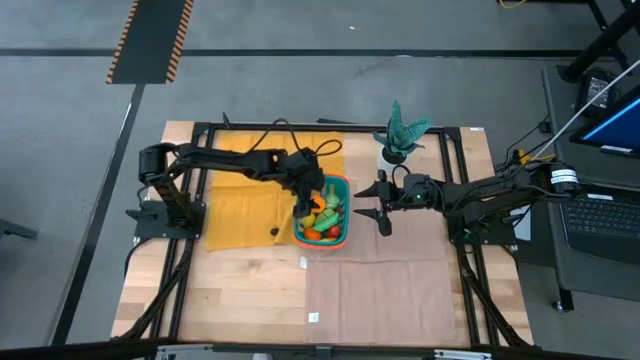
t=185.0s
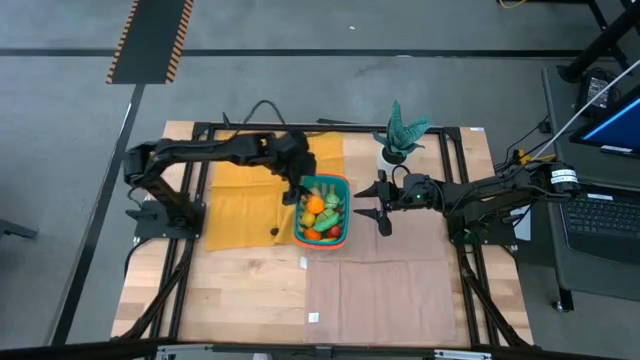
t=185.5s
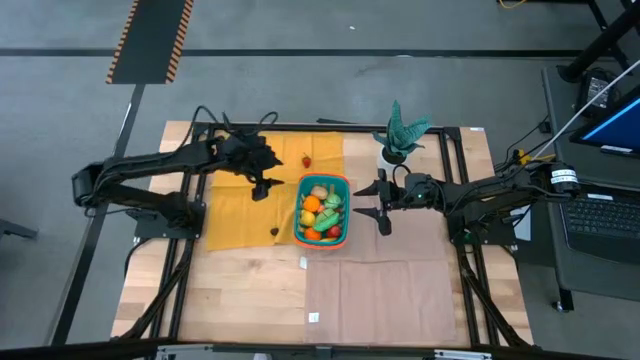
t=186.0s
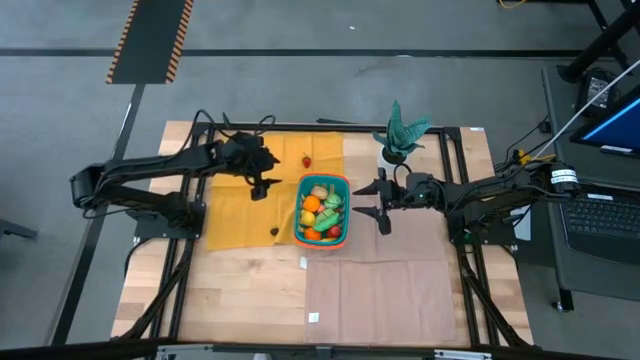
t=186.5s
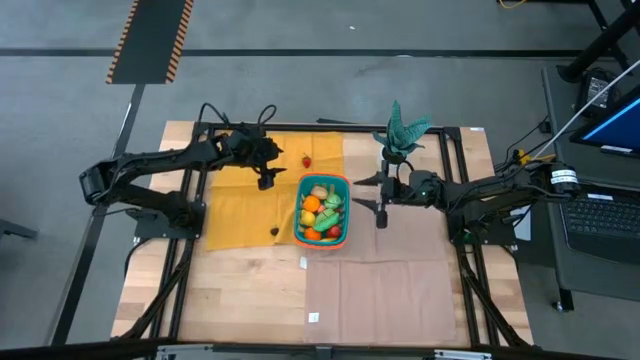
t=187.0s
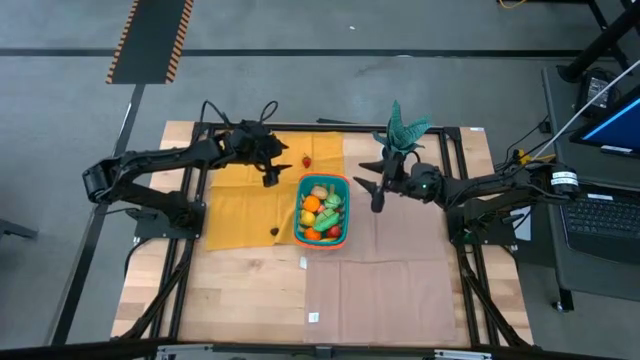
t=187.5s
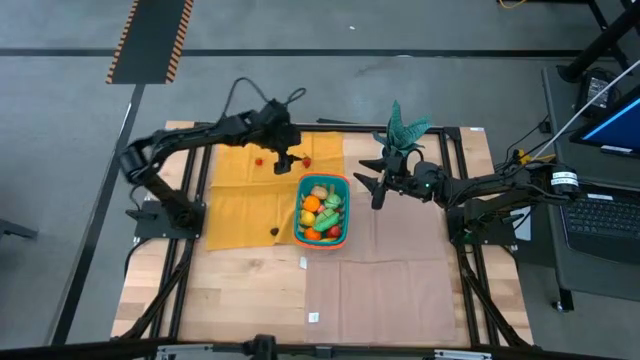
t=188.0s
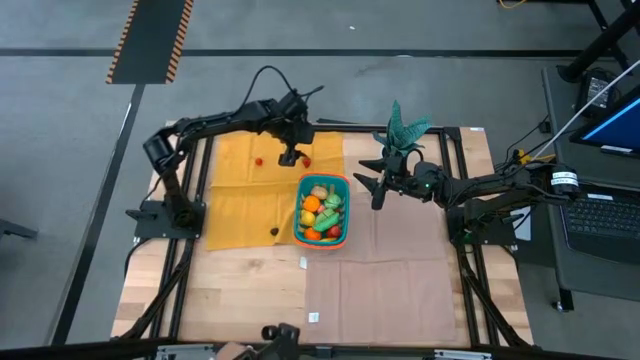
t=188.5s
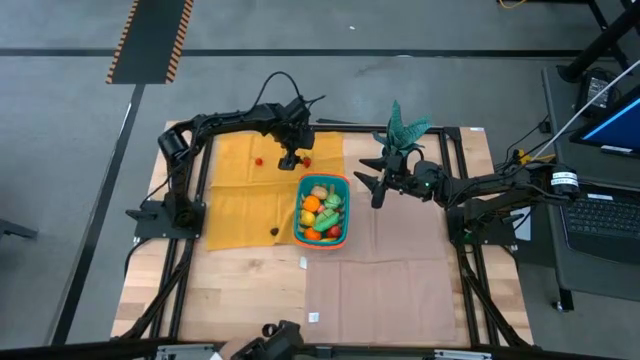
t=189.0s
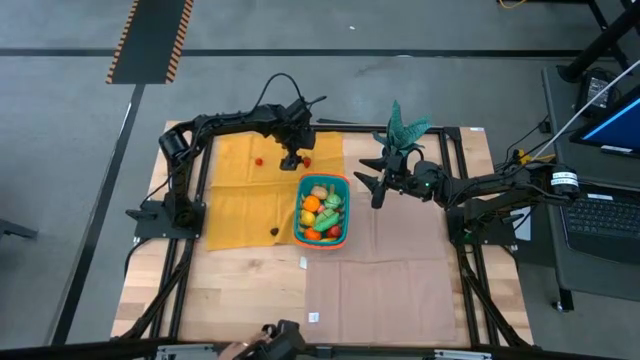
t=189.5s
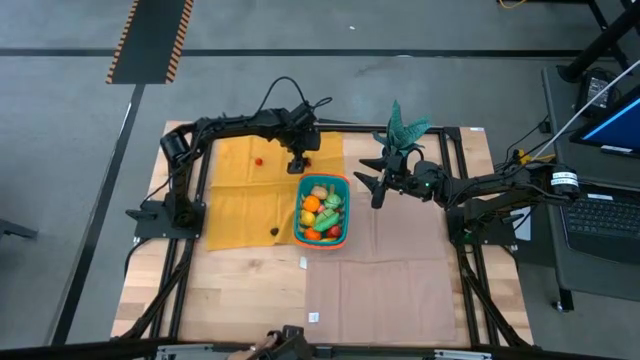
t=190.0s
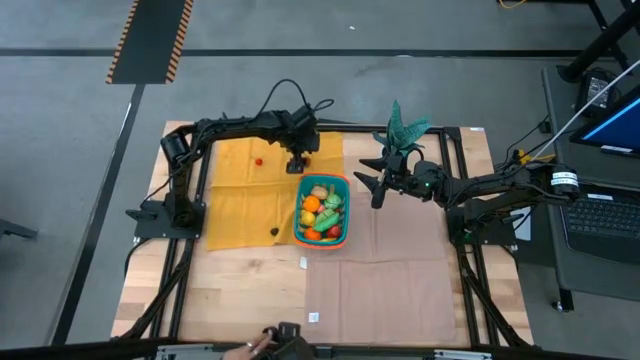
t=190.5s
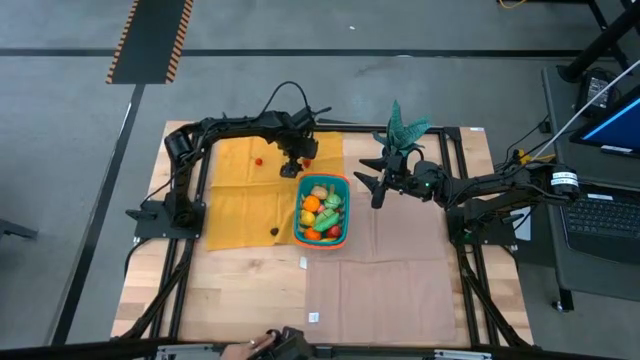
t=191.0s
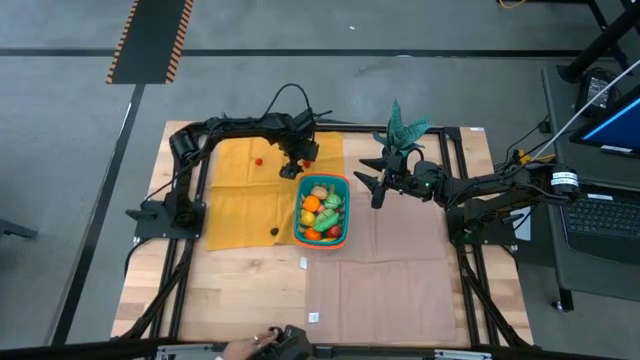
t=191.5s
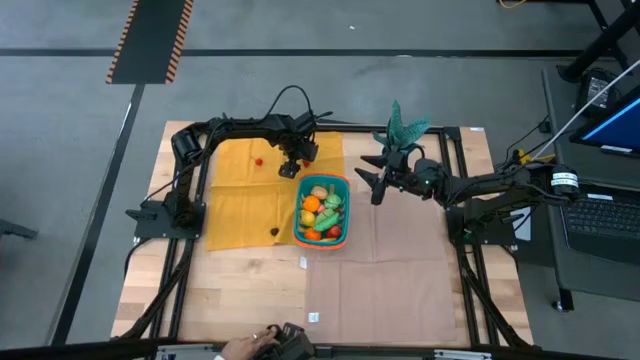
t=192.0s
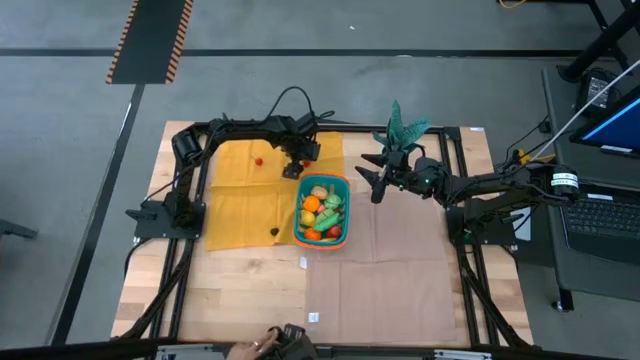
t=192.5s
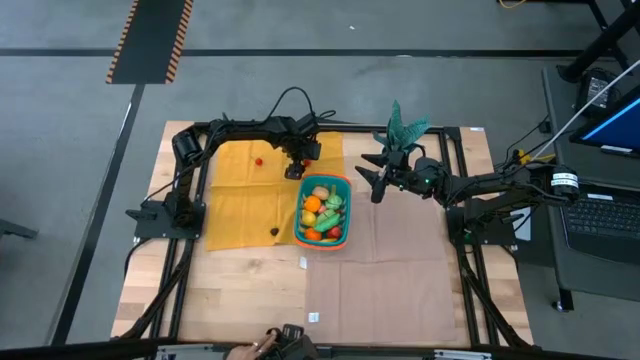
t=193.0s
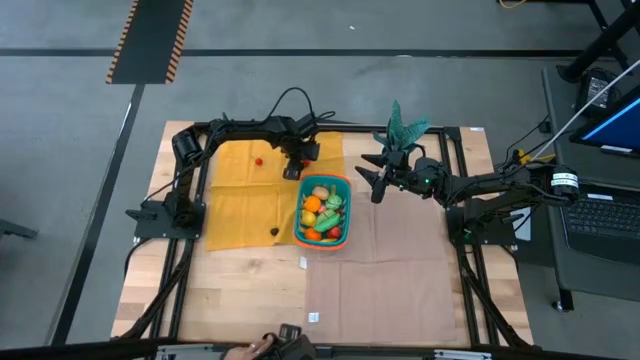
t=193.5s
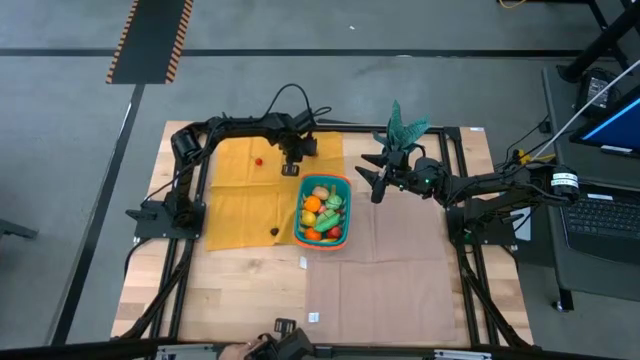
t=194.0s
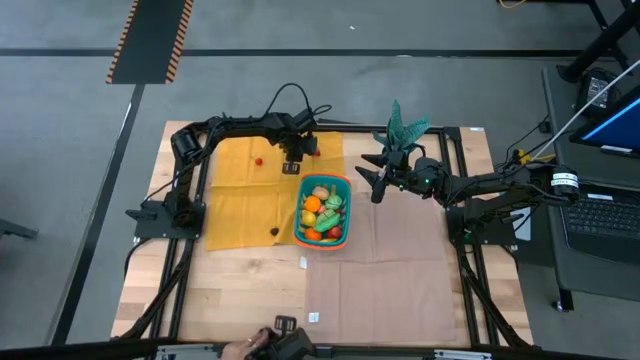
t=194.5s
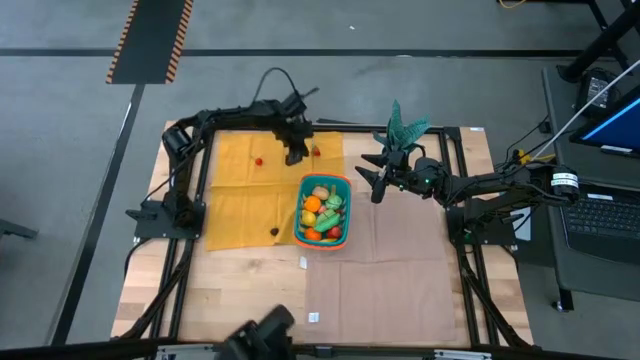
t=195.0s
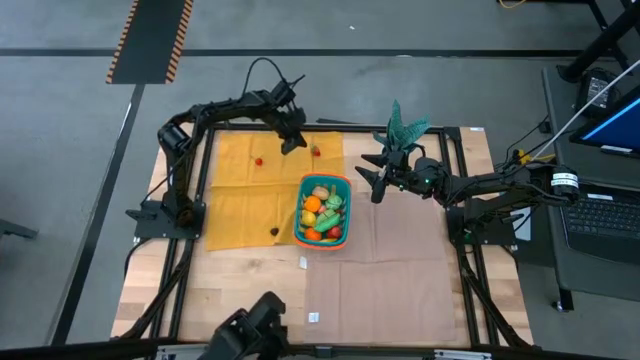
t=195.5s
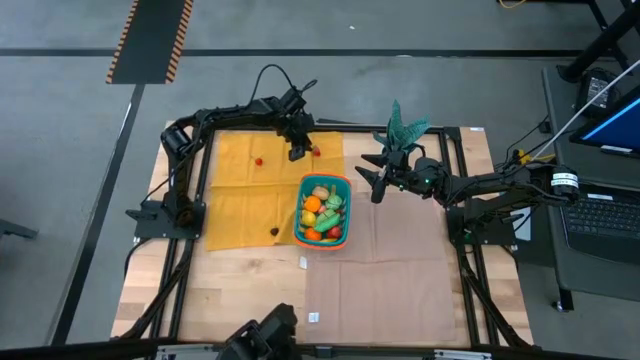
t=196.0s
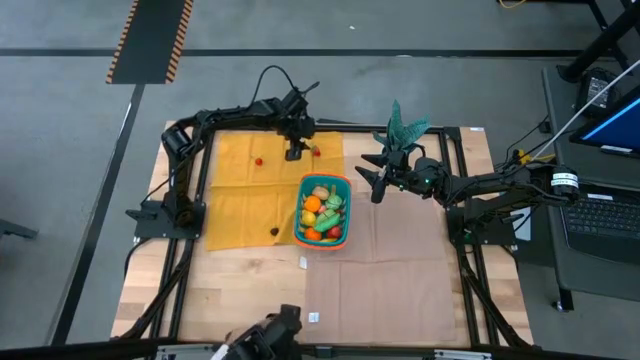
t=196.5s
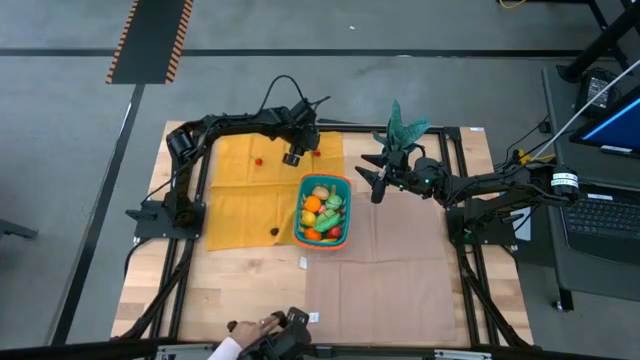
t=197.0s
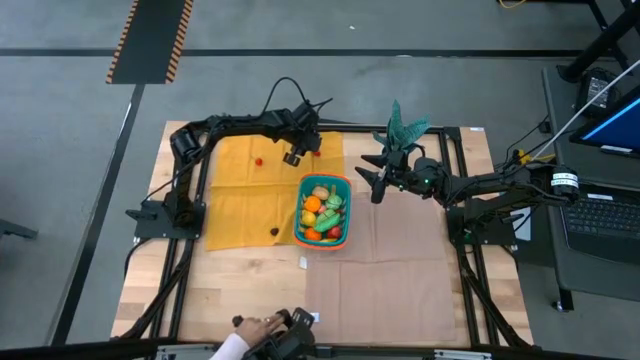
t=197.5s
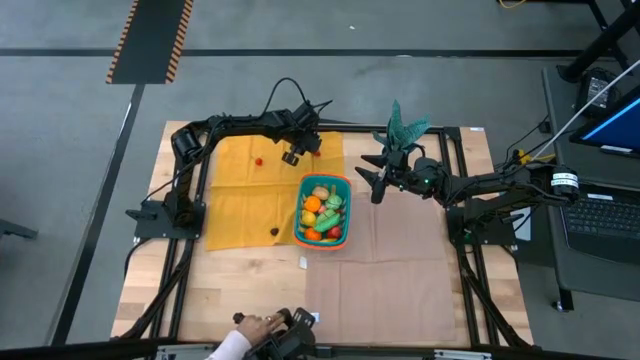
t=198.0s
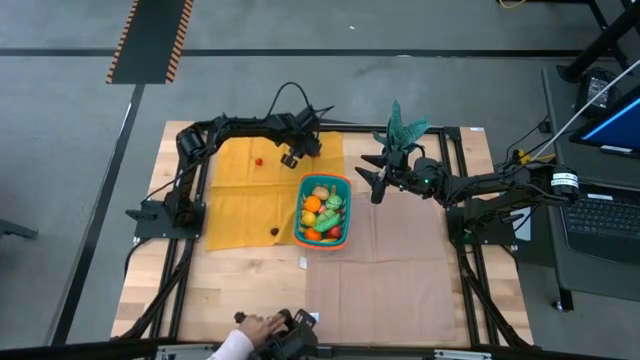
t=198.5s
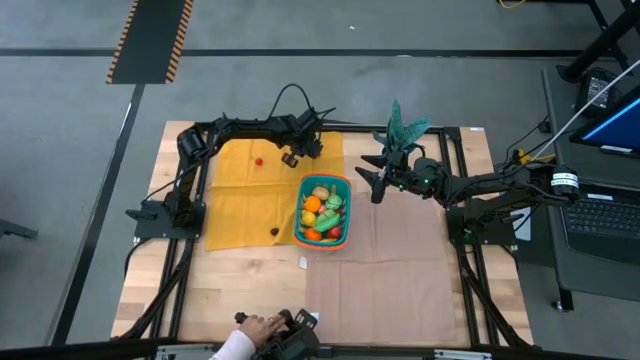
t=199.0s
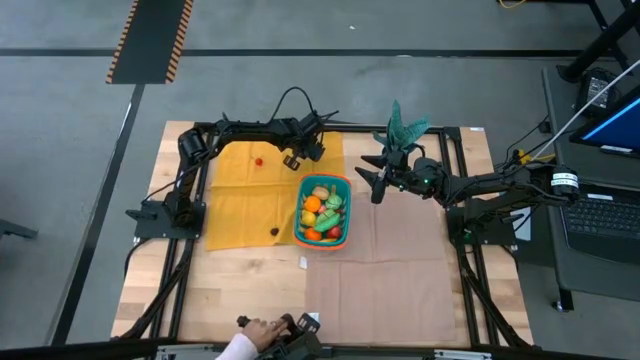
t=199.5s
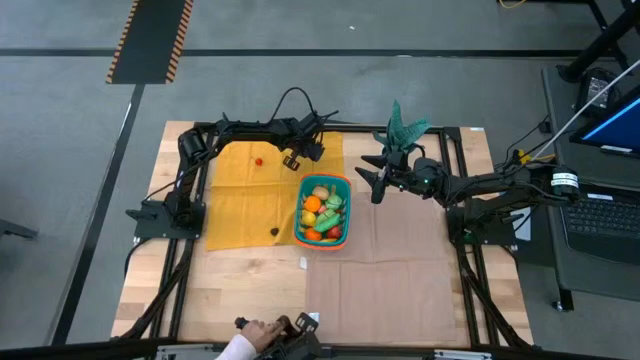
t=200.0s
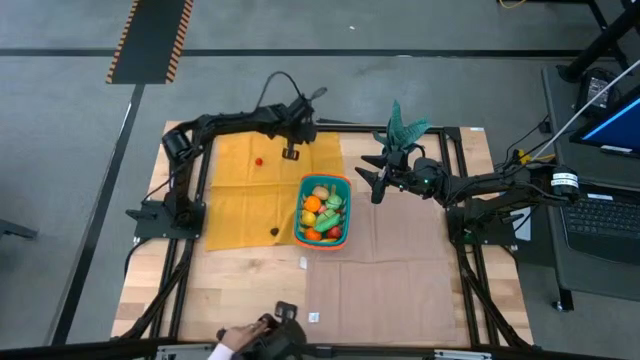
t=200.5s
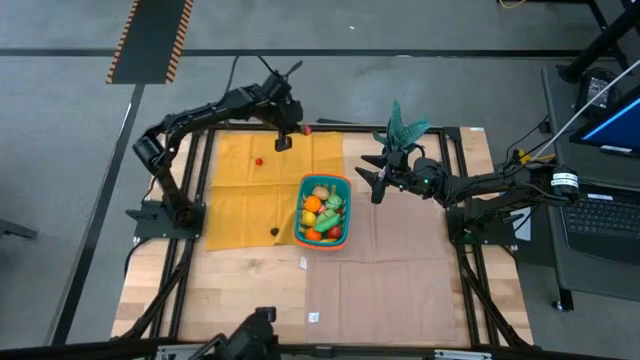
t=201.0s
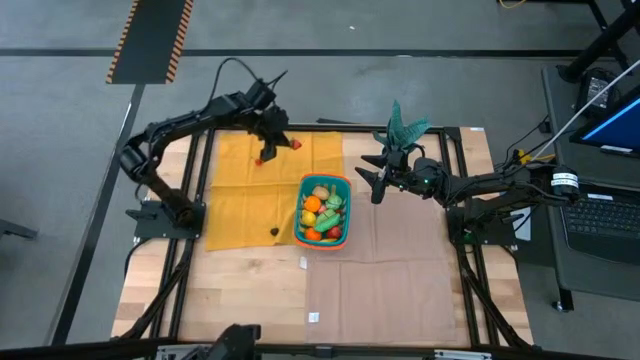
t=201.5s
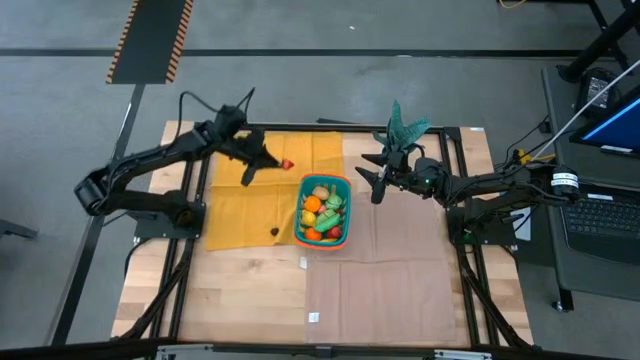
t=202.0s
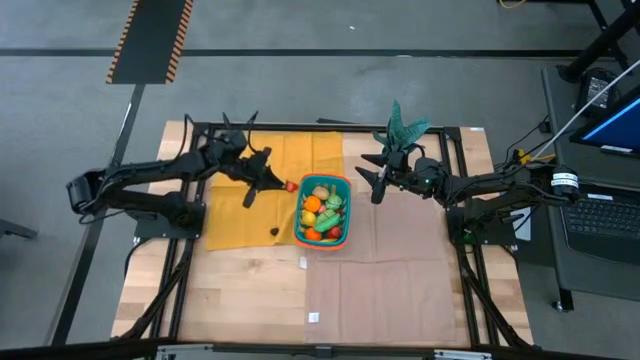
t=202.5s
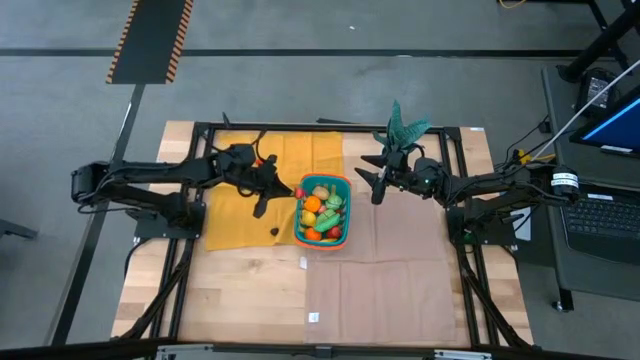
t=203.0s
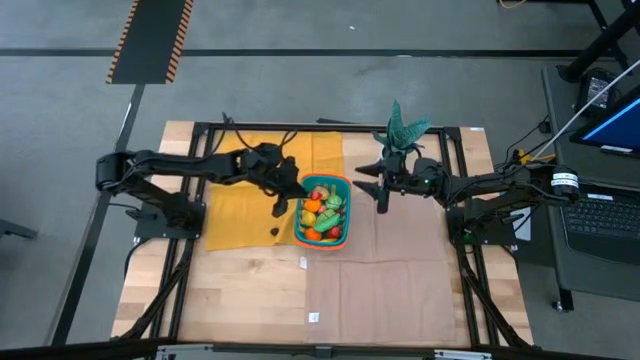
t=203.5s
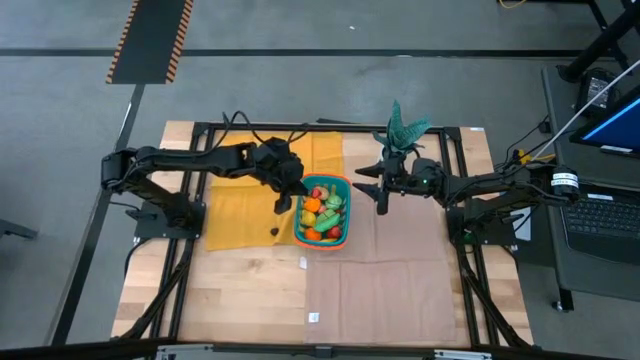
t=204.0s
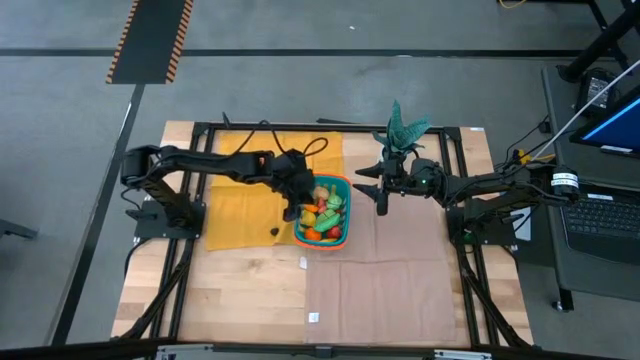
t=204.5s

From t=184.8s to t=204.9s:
Task: Pick and placing Produce into tupperware
Put the strawberry into the basket

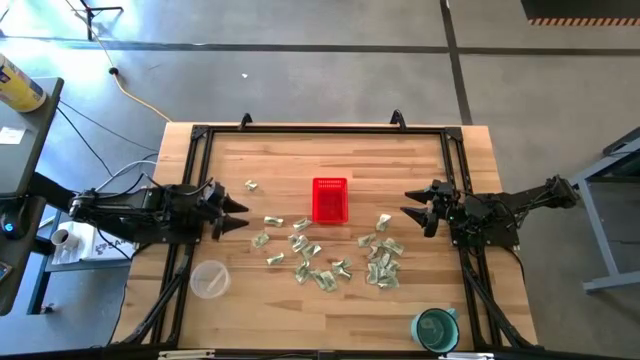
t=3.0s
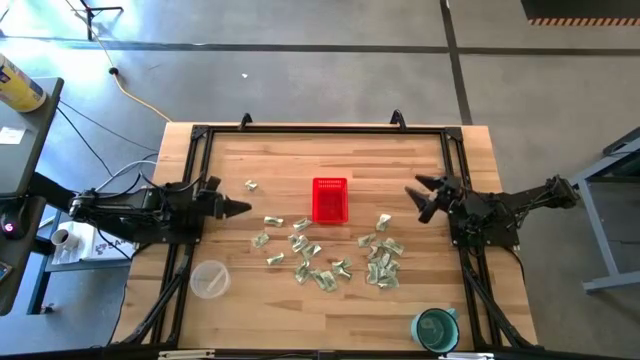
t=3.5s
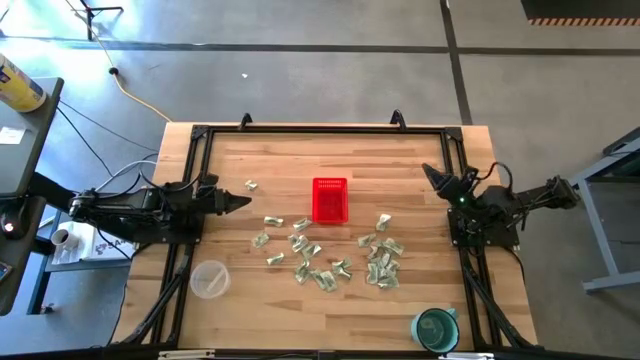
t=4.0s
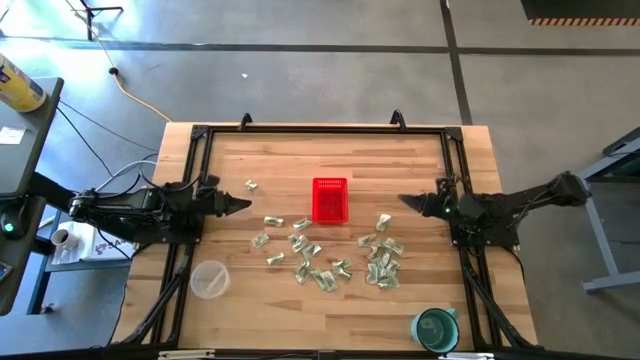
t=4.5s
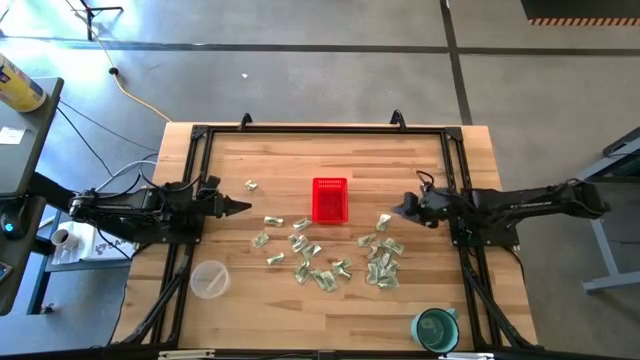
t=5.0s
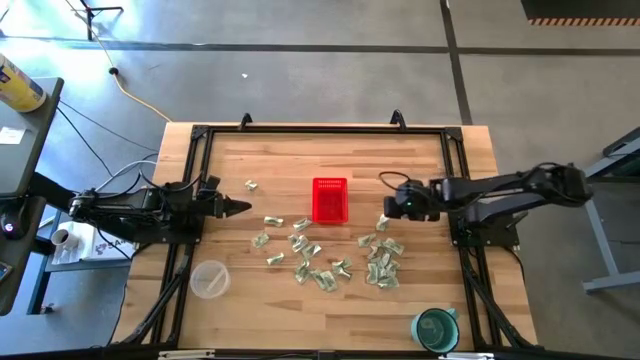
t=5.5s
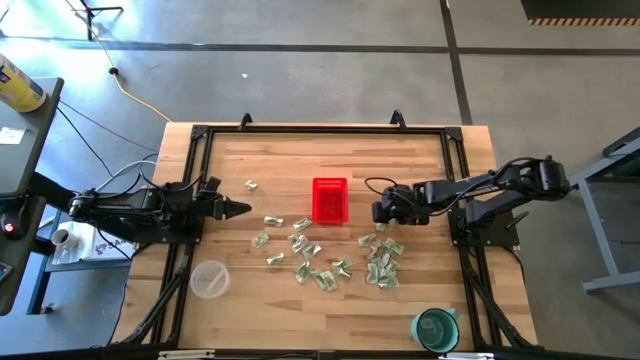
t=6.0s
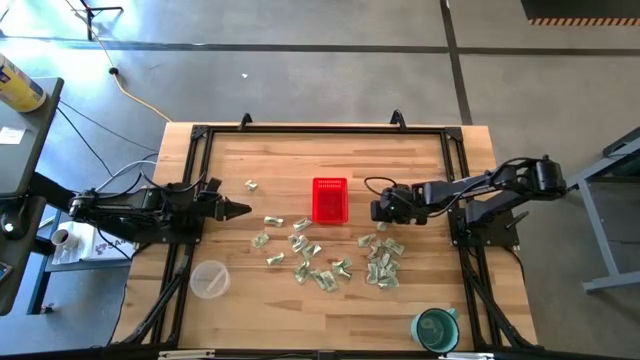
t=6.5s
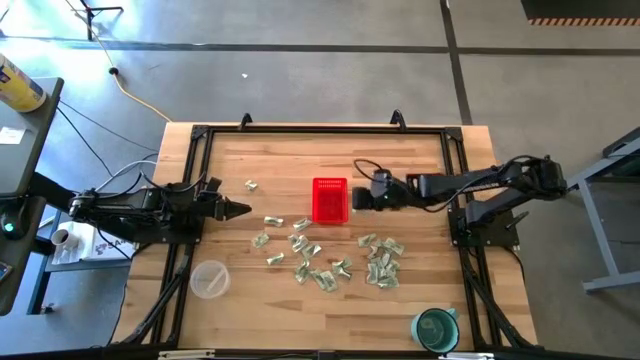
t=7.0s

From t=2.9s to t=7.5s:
Task: Pick and place items into bin
Put the light green stevia packet into the red bin
